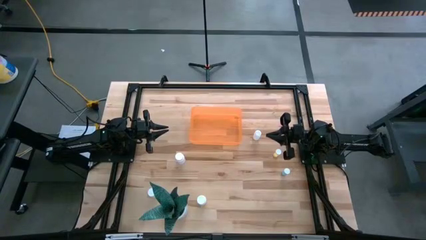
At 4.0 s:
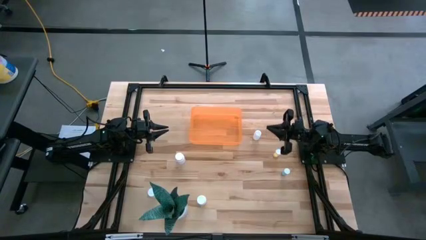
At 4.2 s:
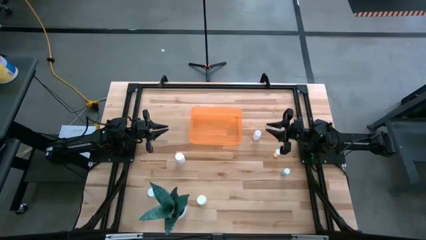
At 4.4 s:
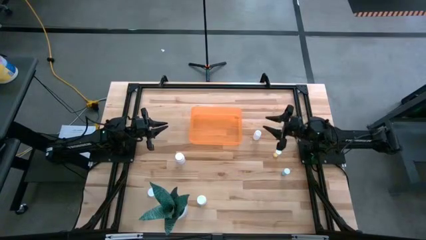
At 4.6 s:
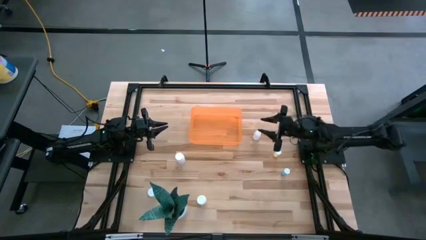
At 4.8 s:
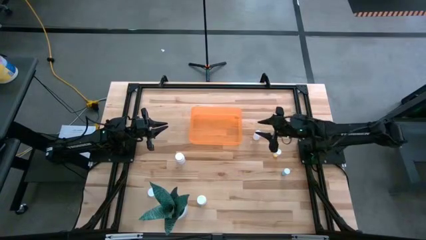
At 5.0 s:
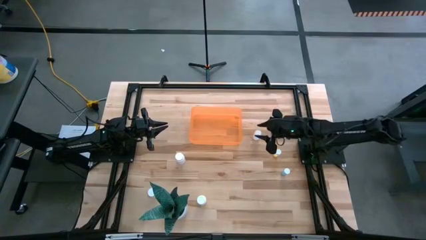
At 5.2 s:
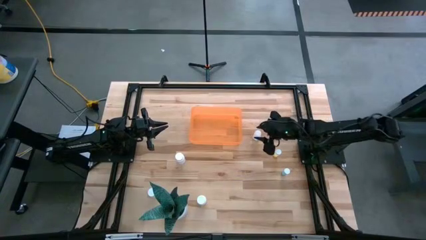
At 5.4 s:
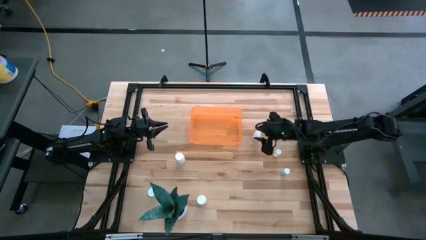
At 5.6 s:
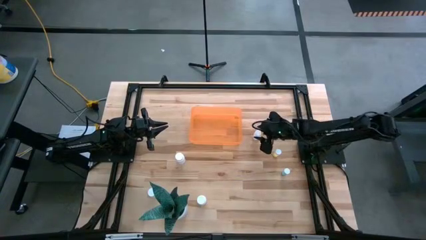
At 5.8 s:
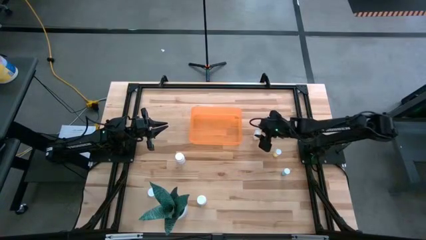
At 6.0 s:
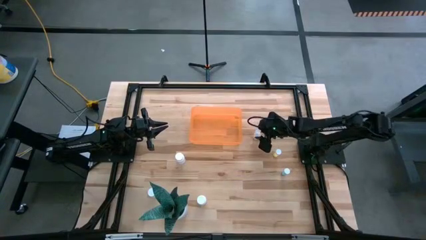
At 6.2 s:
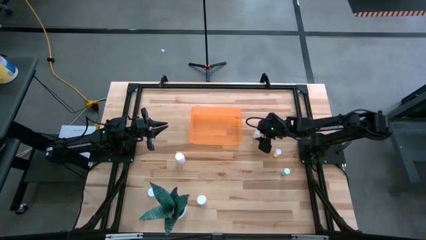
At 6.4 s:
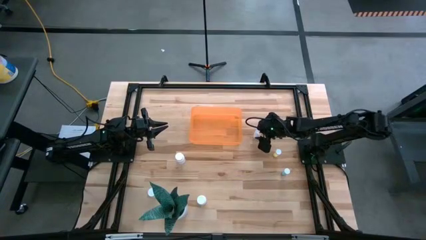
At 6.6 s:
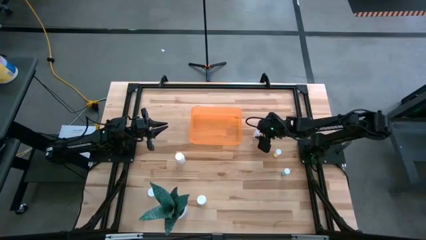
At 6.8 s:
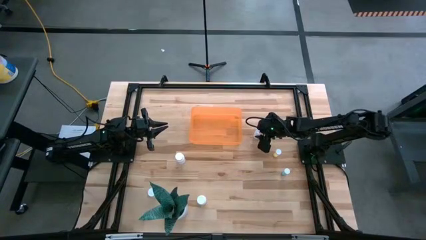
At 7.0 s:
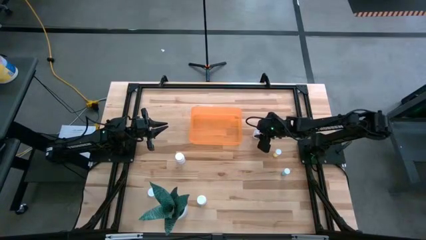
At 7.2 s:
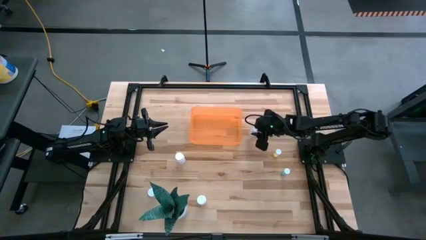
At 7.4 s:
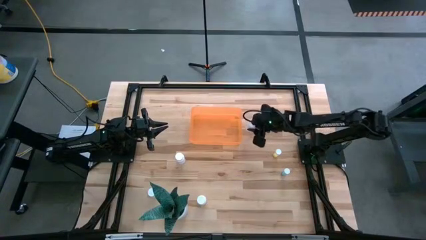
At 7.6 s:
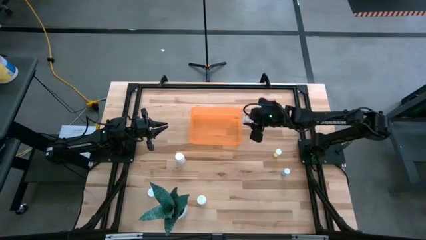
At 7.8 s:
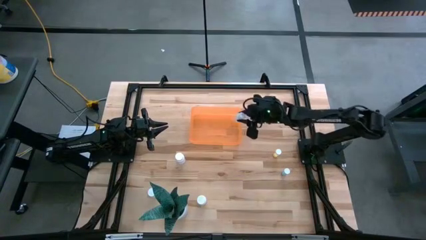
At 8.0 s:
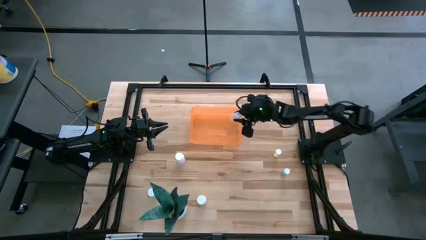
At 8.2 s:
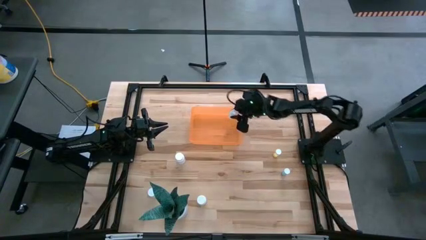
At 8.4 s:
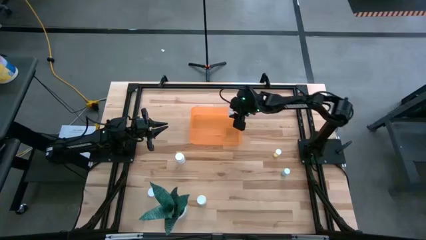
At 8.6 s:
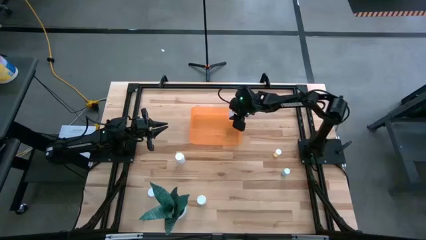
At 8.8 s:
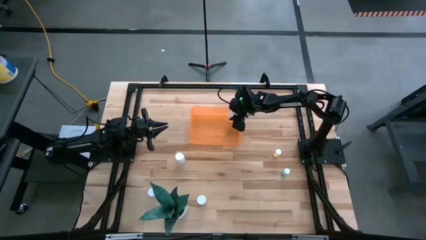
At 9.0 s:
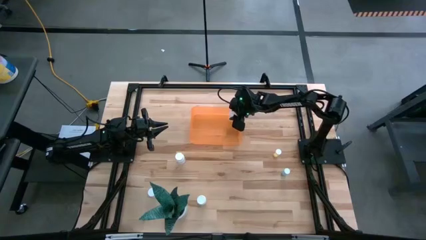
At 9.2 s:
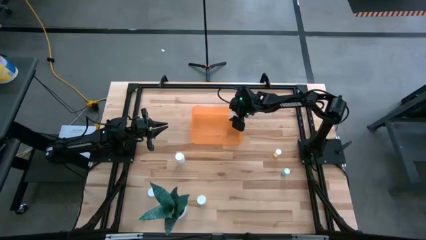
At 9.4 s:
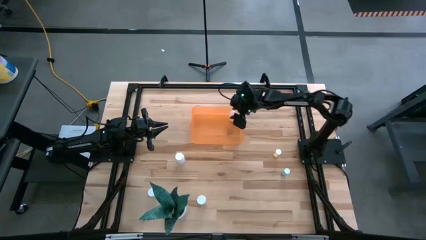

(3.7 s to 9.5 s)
Task: Pick and place pill bottles into a basket
Put the transparent pill bottle in the orange bin

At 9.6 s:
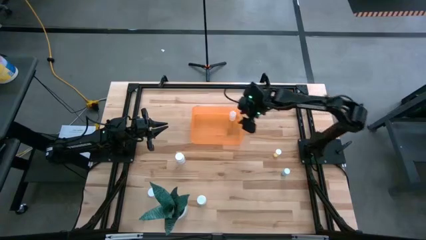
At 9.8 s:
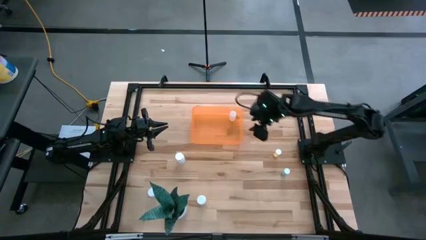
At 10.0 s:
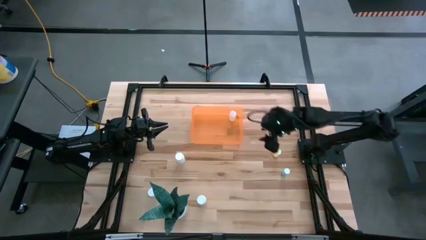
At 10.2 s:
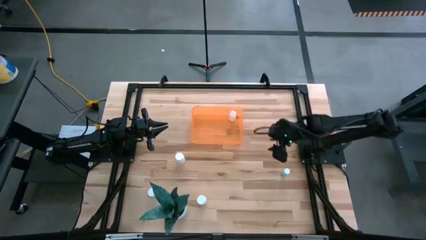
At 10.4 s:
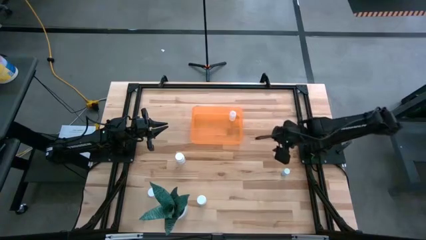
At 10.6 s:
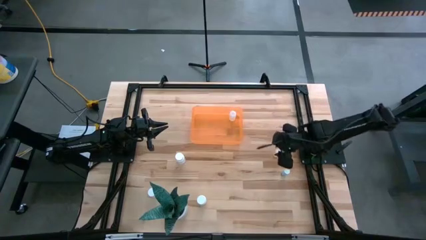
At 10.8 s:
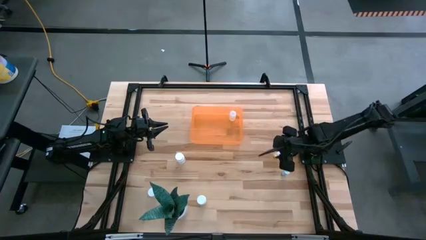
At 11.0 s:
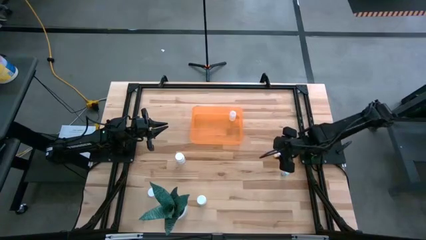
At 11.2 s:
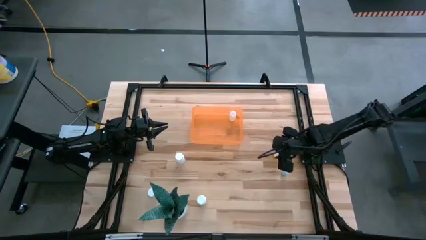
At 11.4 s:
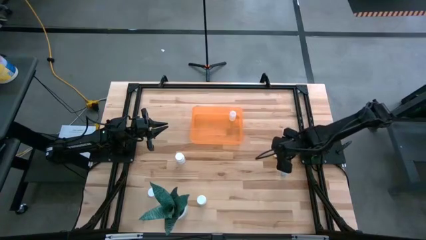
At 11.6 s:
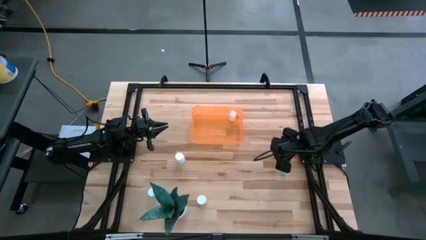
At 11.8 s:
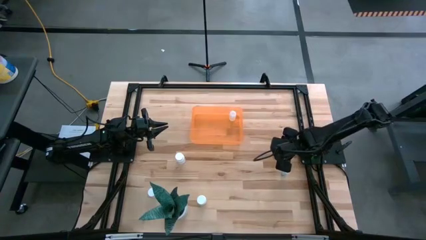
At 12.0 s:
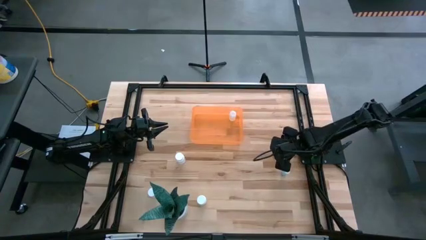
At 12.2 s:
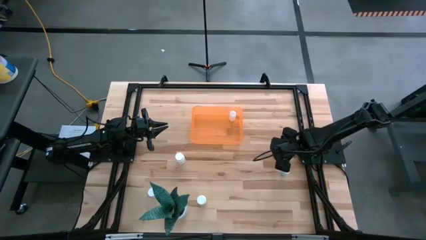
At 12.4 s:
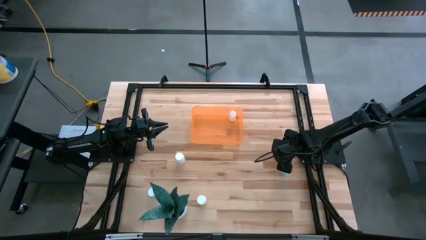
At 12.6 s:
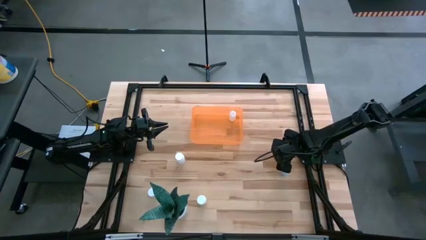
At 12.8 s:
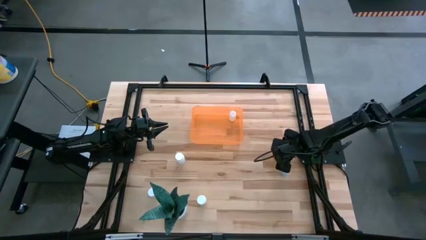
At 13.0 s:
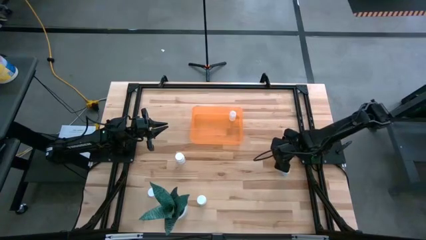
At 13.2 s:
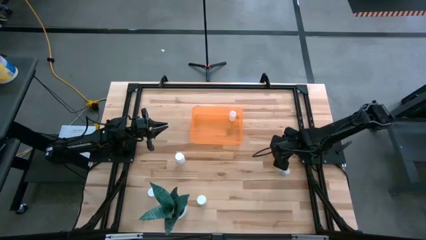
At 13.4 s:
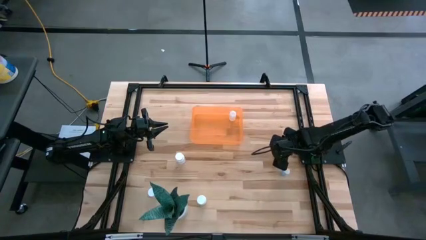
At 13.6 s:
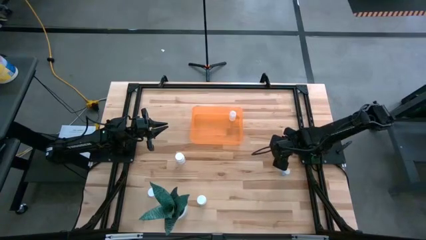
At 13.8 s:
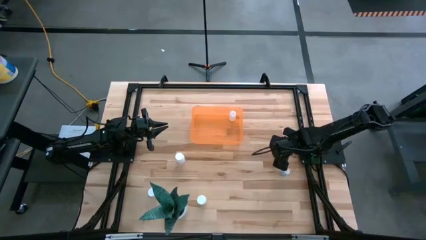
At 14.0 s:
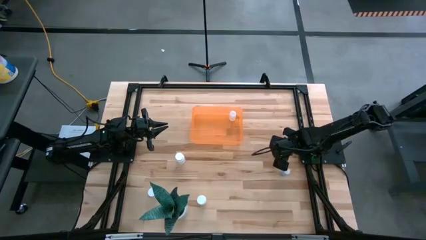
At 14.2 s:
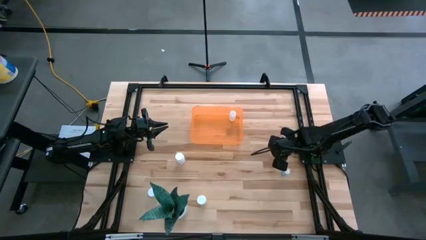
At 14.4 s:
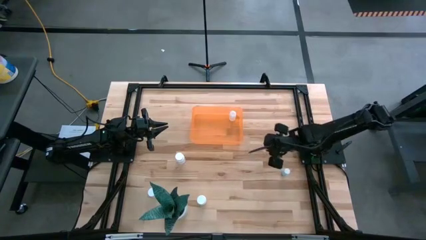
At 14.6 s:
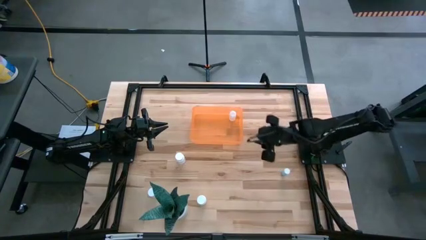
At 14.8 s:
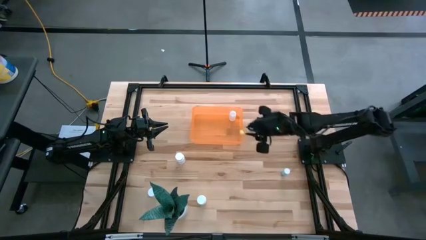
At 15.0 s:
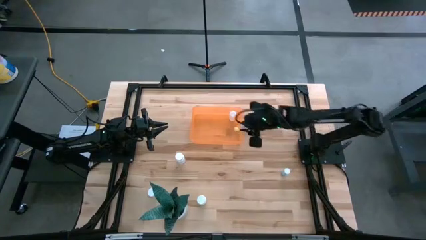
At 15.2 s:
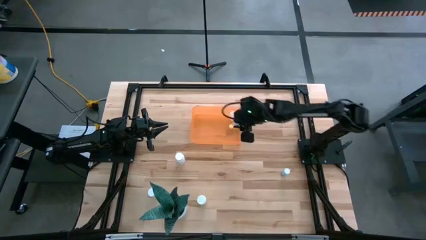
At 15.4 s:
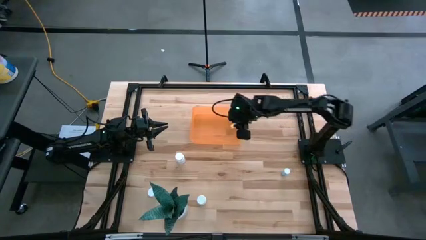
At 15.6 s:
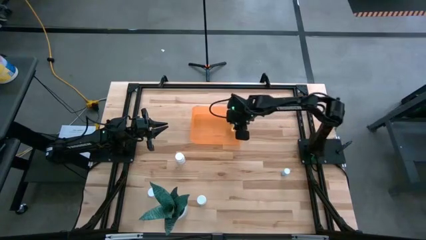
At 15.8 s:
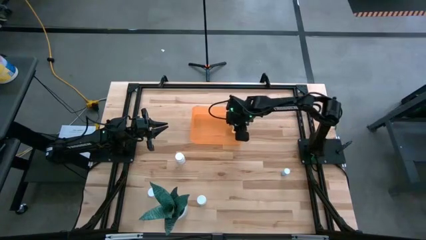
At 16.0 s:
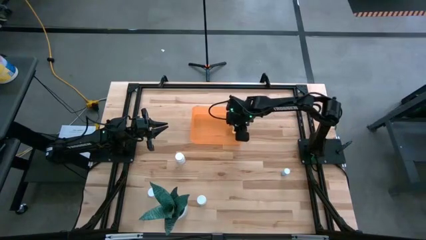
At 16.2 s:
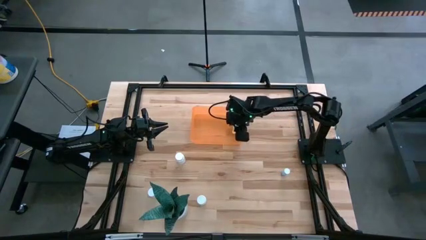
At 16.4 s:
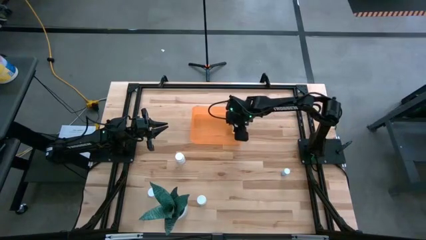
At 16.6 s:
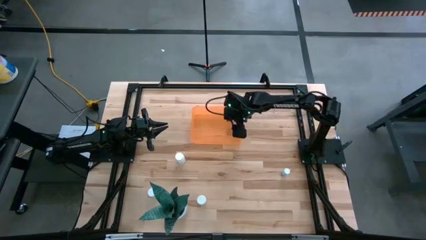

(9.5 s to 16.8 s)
Put the yellow pill bottle in the orange bin

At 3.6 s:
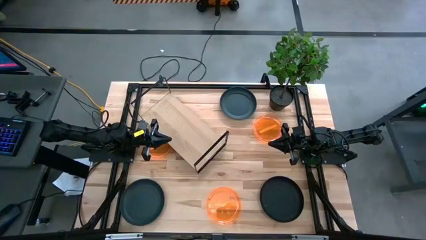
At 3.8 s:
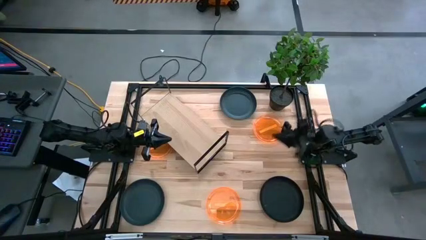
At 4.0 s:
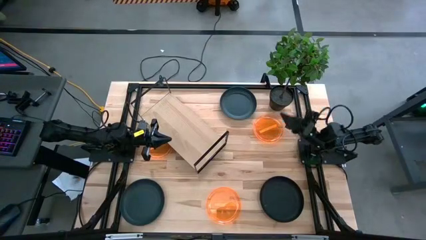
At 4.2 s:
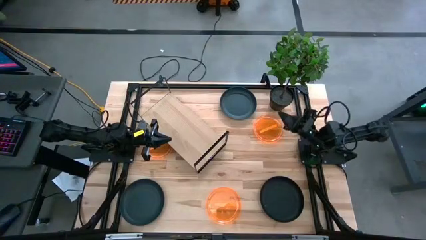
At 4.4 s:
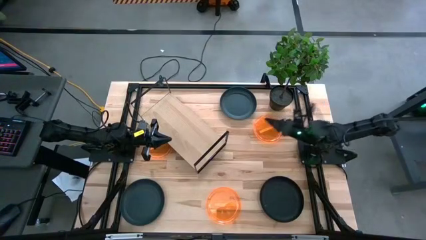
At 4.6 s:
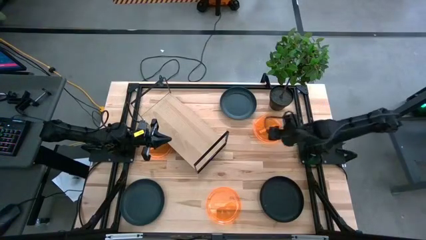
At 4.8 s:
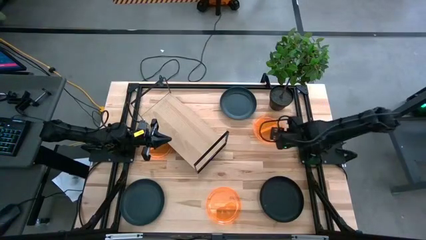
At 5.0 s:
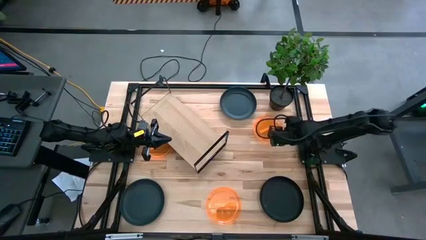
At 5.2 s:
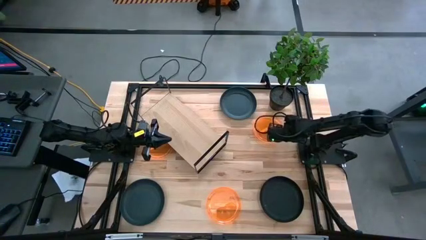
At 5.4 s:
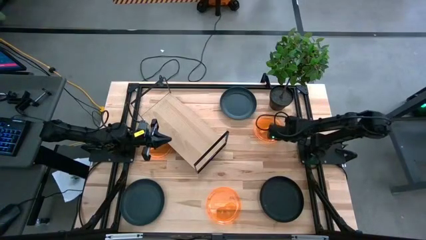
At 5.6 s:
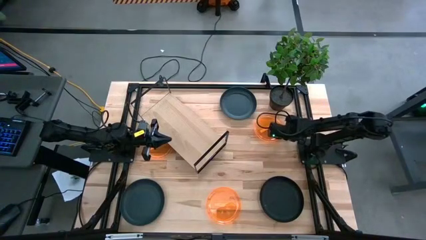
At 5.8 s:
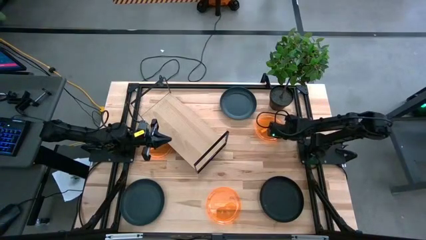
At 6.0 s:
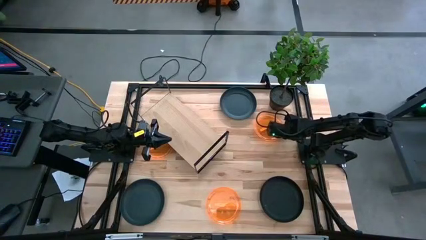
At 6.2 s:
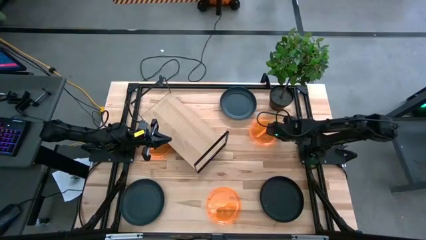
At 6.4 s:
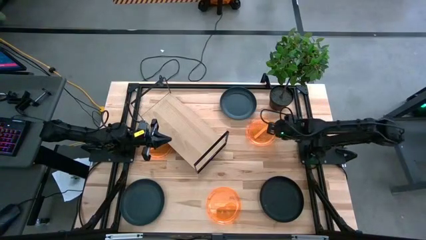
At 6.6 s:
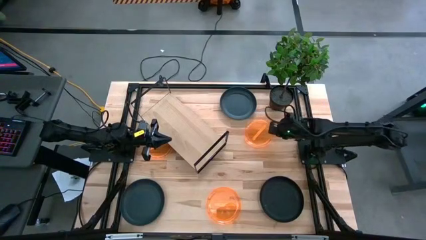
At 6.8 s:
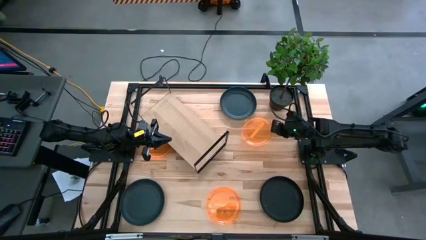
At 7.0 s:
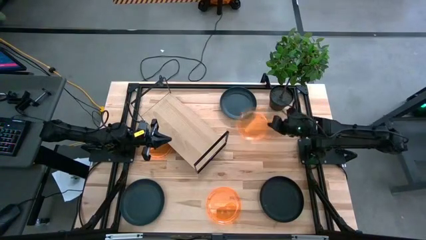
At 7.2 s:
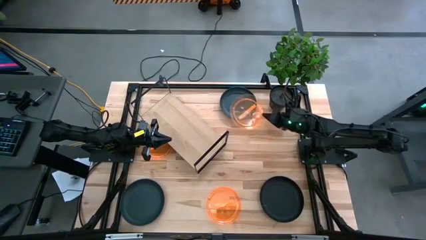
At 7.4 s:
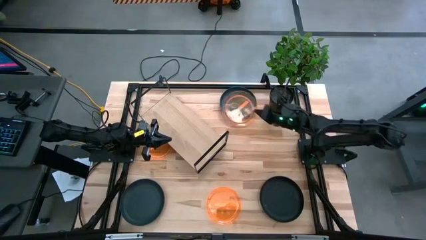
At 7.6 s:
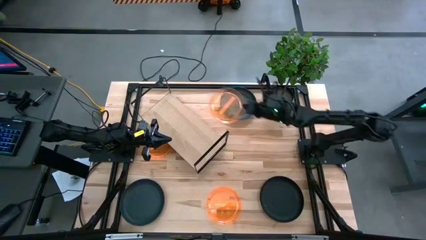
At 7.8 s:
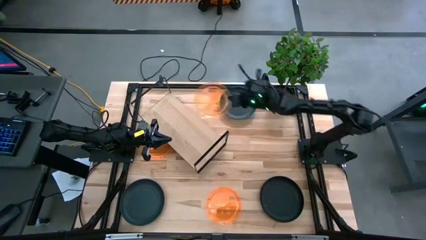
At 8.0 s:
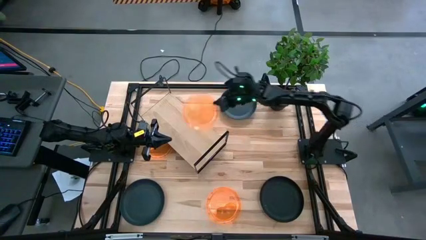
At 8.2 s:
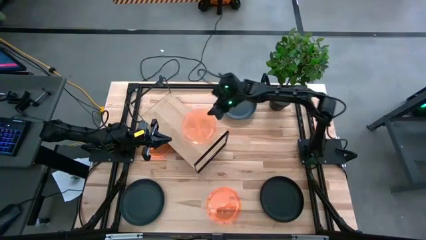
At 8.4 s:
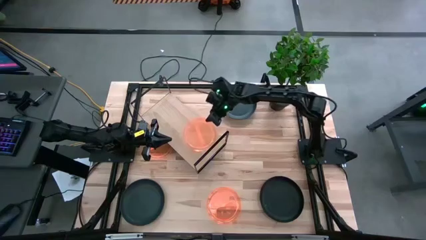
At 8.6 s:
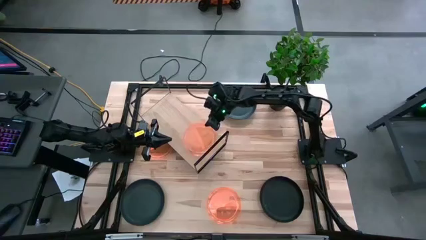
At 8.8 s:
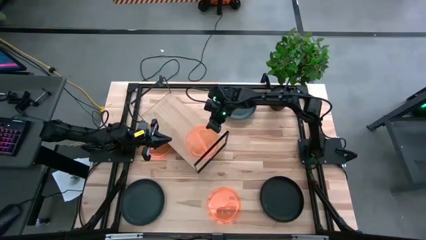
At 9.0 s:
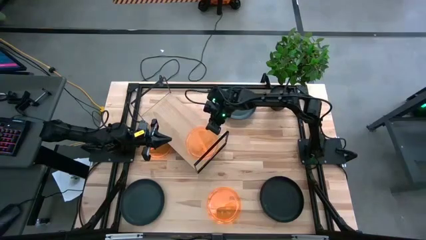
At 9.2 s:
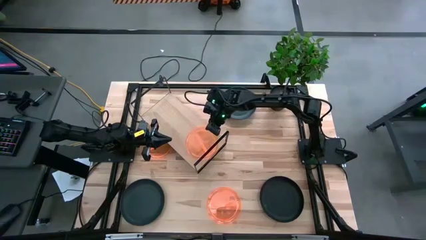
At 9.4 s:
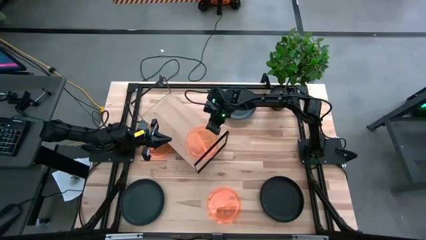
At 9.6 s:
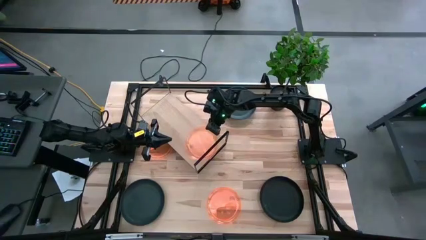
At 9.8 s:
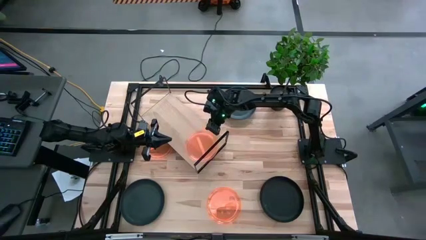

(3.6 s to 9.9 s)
Task: Place and stack plates onto a shelf
Put the top orange plate on the shelf
